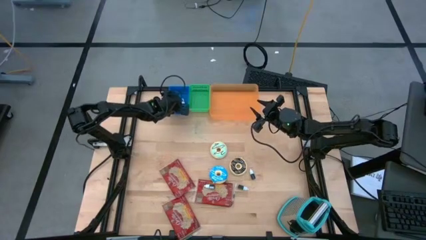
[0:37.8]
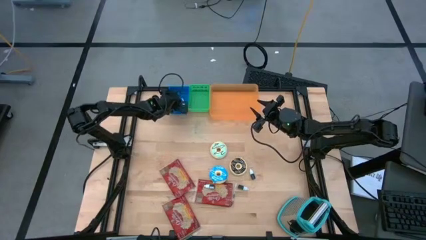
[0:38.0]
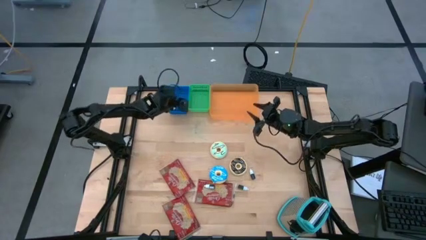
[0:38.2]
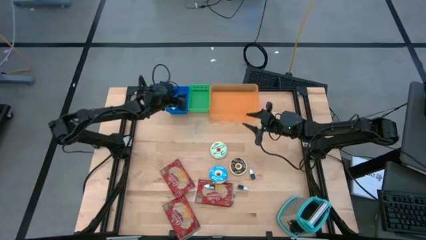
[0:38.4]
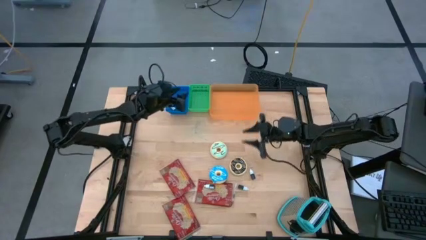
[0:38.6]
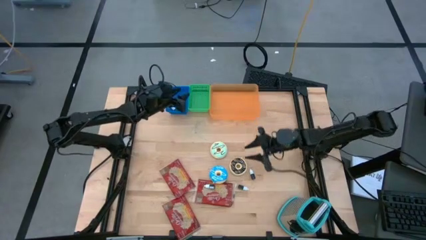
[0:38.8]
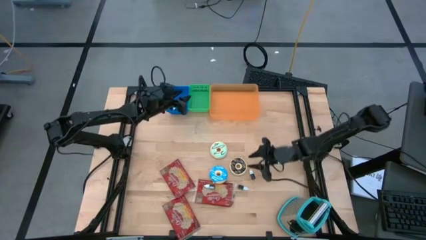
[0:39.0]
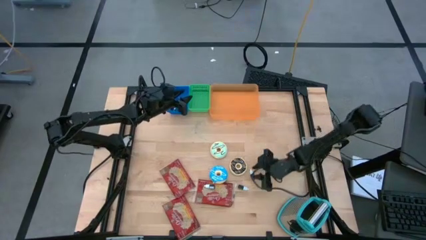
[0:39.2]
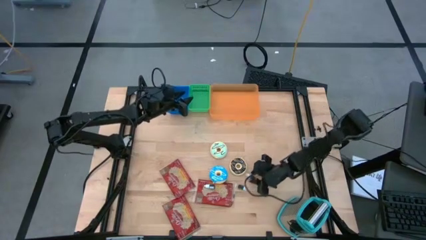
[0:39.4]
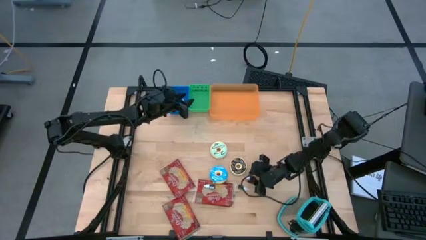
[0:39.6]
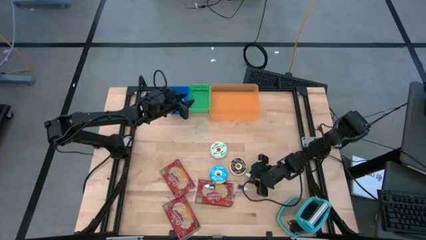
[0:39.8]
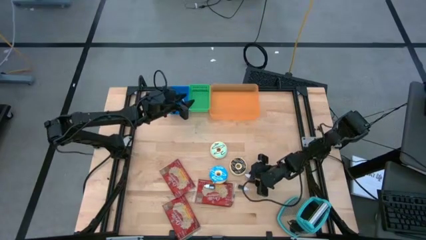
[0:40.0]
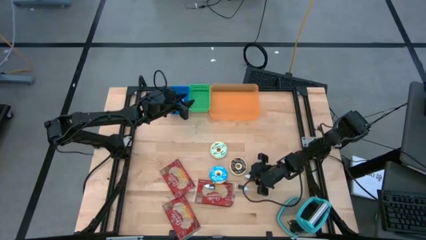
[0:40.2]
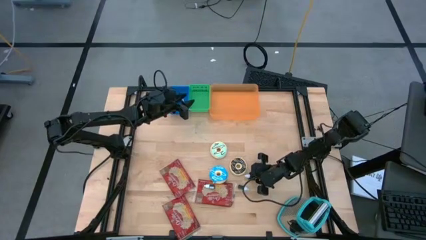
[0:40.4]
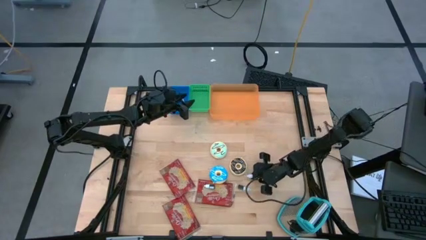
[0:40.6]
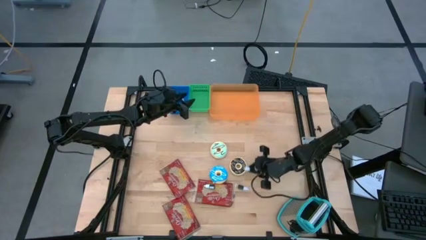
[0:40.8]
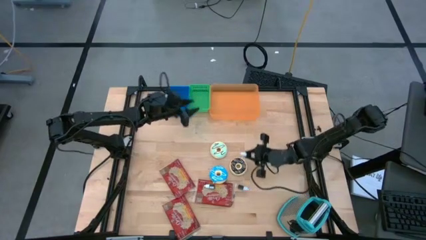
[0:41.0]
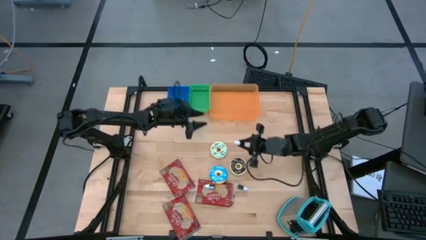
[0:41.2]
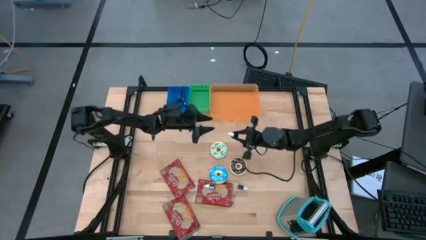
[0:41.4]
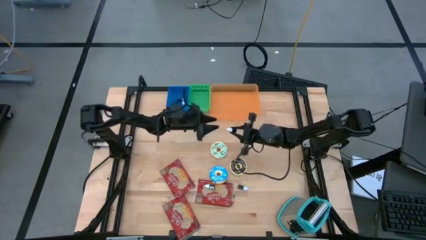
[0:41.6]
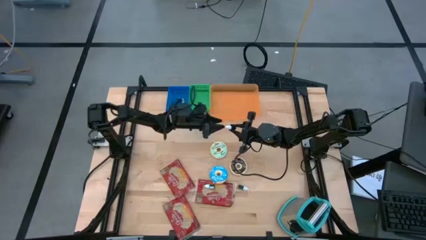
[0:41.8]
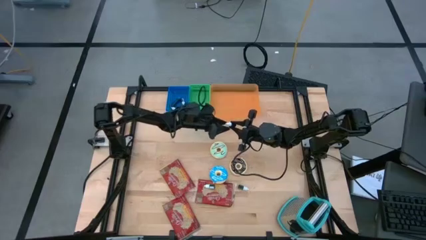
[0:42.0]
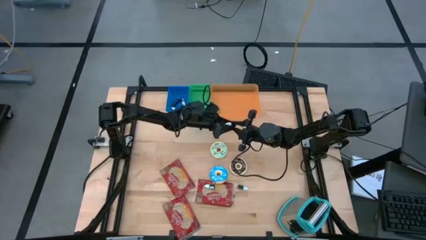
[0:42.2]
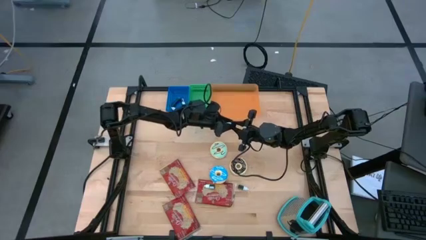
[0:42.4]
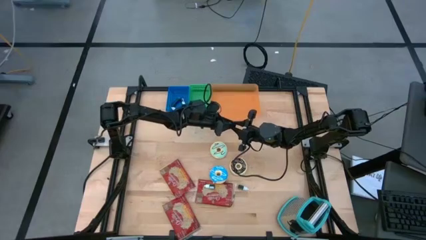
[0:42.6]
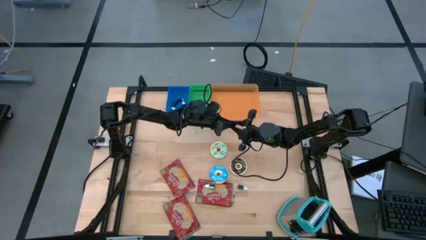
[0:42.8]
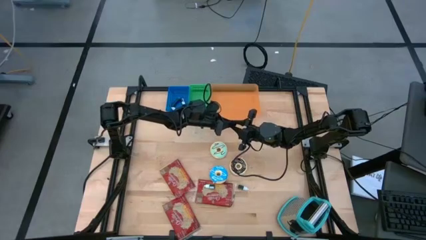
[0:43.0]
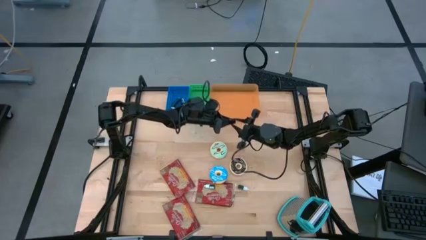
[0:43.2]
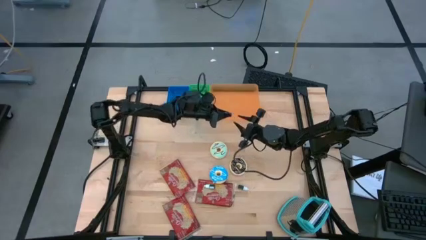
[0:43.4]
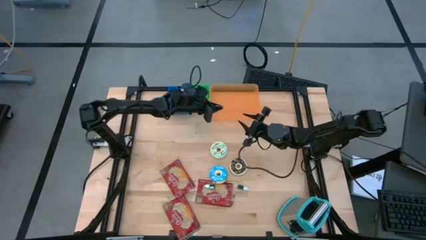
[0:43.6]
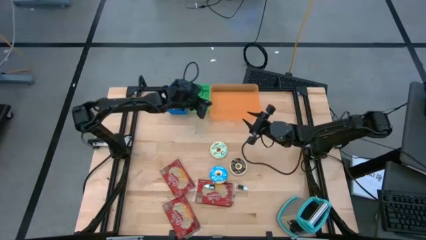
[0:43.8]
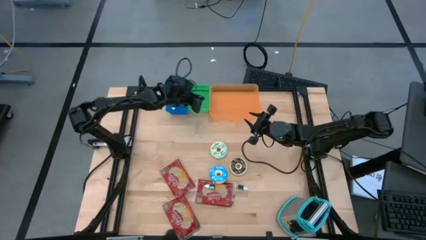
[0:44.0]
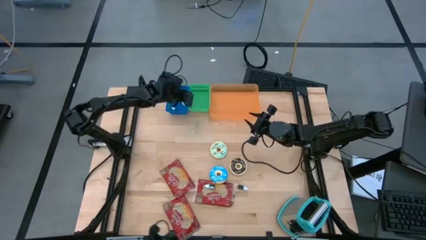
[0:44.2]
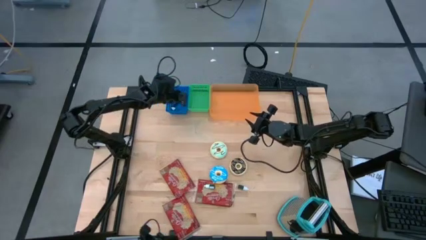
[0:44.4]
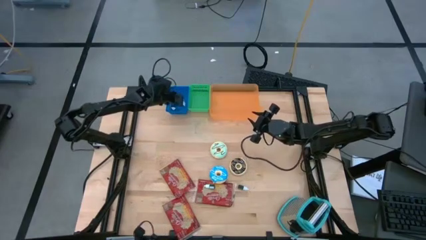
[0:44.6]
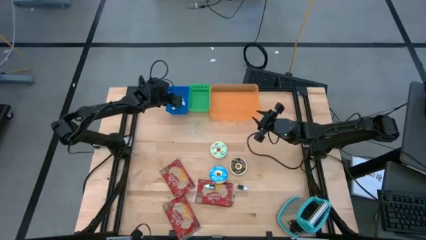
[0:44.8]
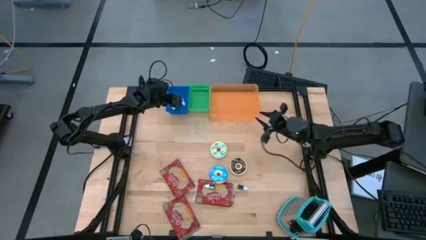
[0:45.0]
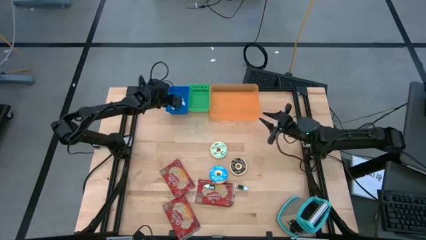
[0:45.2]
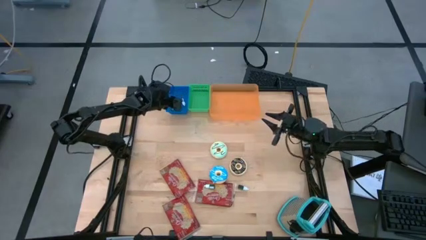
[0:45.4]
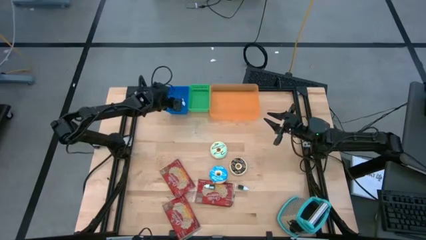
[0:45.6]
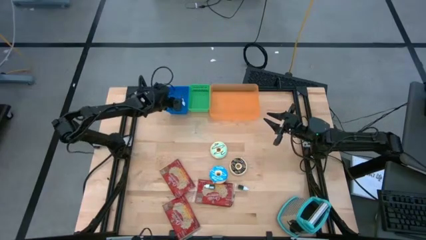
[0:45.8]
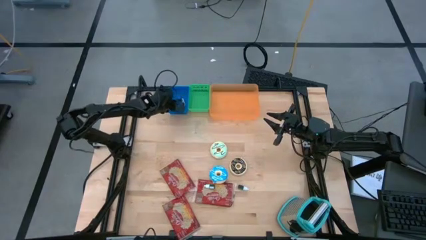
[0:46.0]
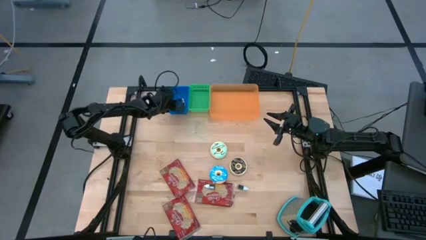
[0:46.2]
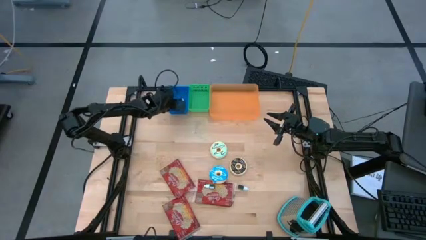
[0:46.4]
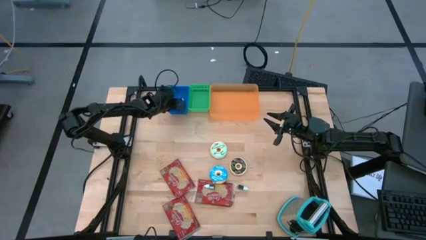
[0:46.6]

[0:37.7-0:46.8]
Put the violet food coloring bottle into the blue bin

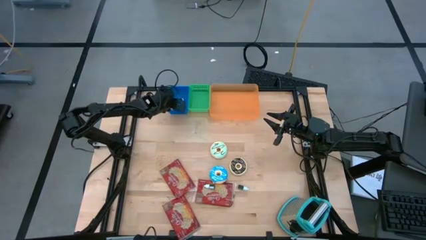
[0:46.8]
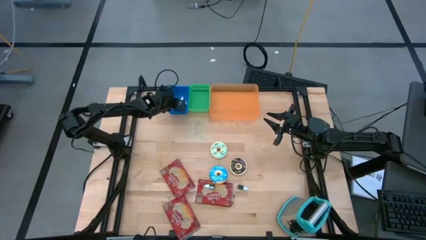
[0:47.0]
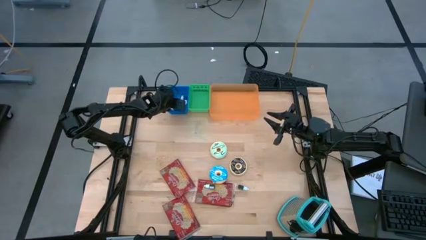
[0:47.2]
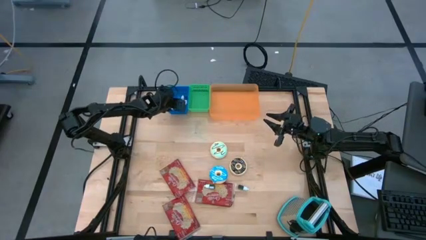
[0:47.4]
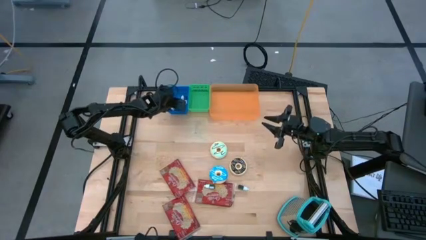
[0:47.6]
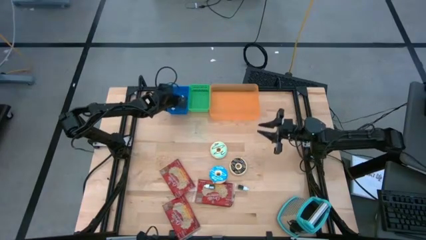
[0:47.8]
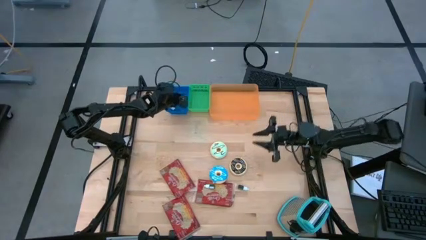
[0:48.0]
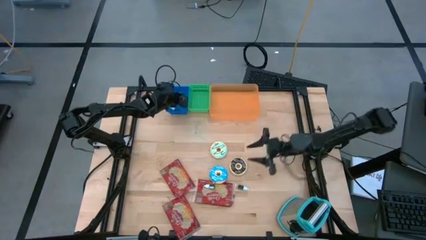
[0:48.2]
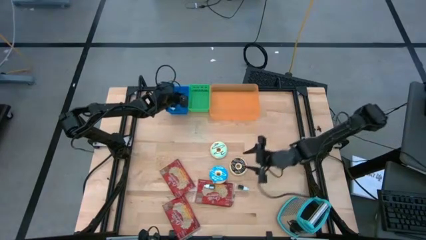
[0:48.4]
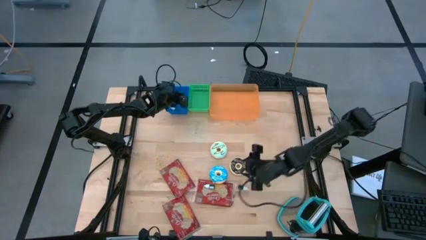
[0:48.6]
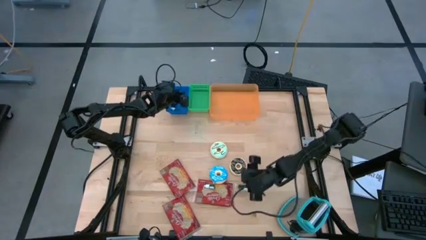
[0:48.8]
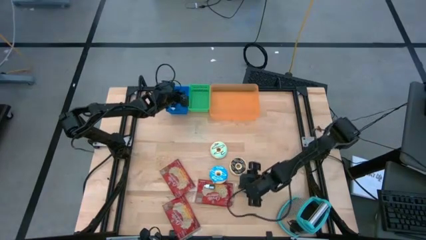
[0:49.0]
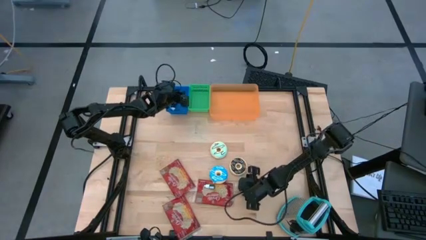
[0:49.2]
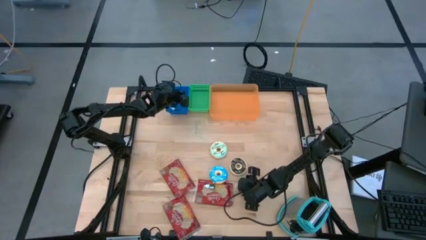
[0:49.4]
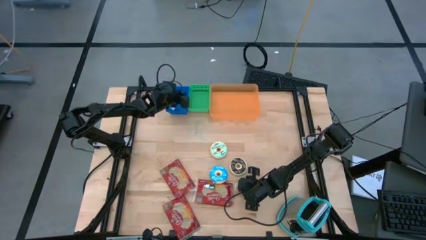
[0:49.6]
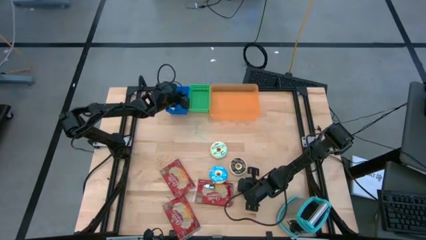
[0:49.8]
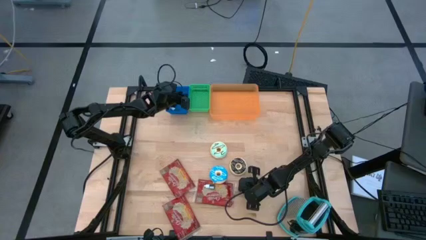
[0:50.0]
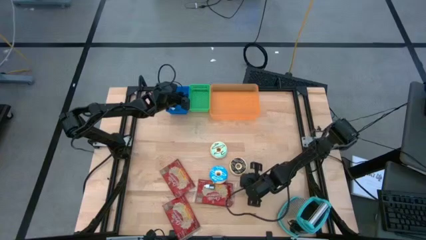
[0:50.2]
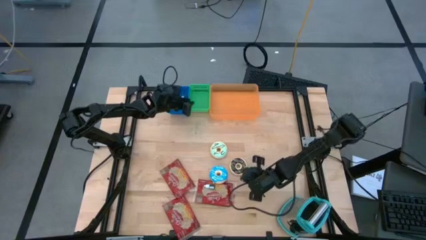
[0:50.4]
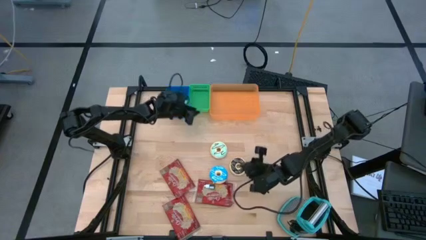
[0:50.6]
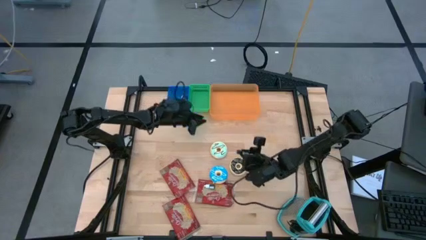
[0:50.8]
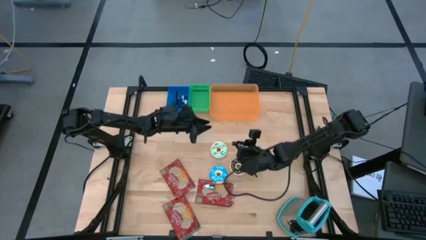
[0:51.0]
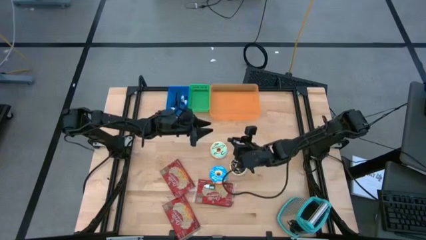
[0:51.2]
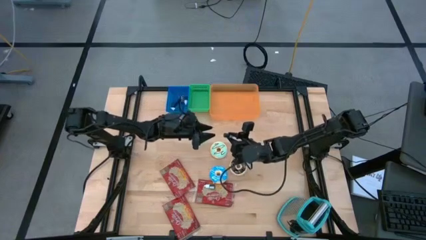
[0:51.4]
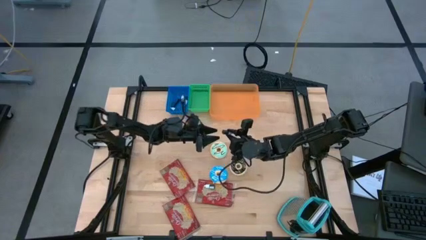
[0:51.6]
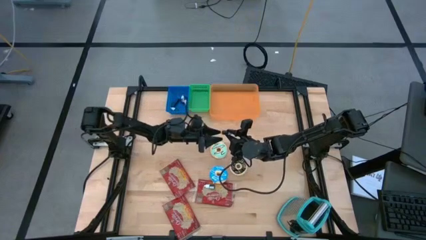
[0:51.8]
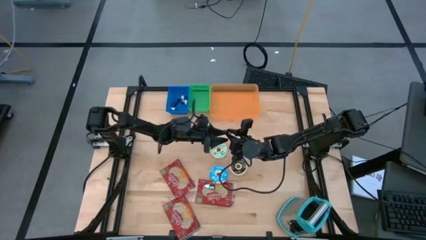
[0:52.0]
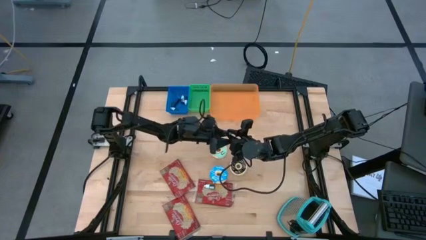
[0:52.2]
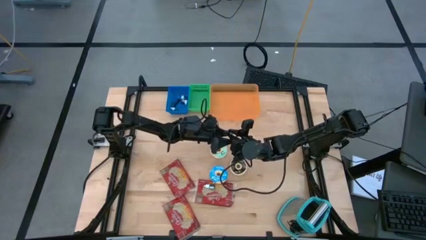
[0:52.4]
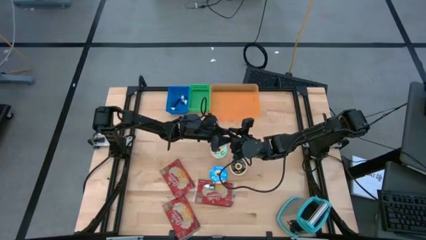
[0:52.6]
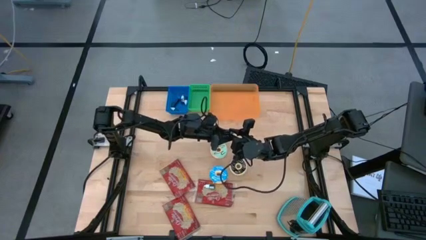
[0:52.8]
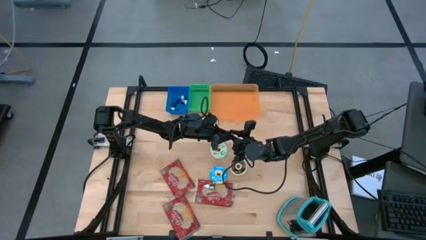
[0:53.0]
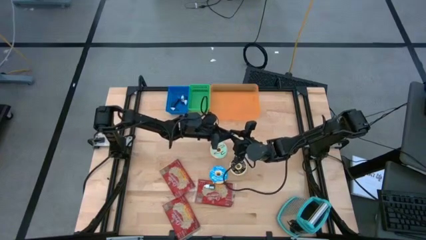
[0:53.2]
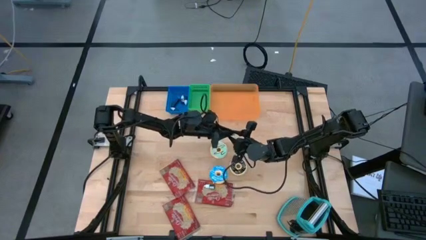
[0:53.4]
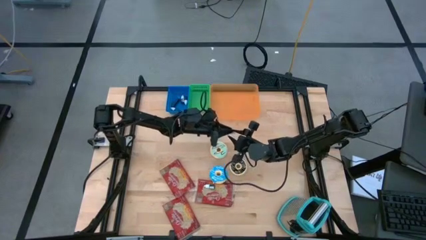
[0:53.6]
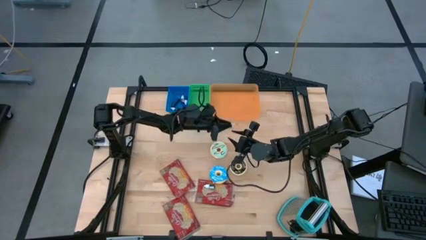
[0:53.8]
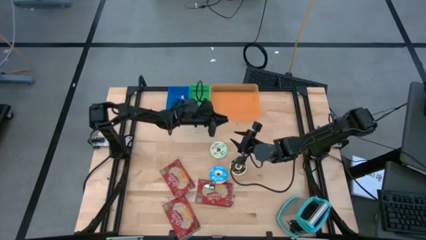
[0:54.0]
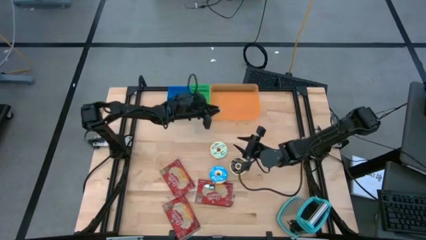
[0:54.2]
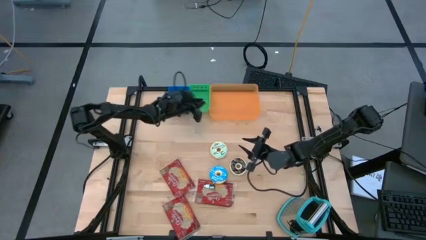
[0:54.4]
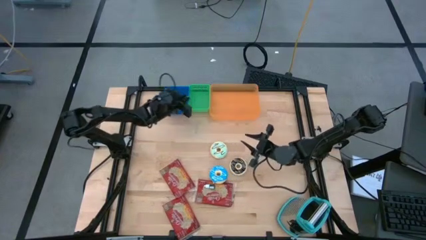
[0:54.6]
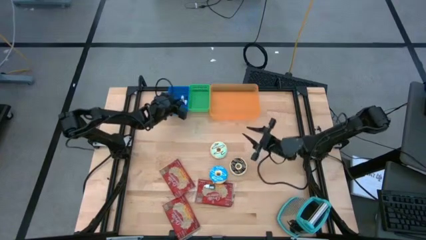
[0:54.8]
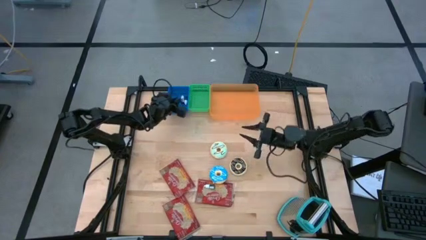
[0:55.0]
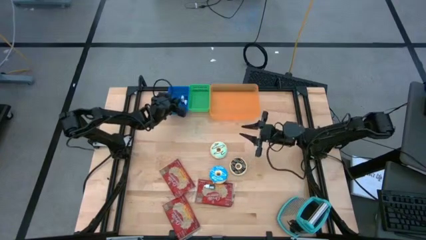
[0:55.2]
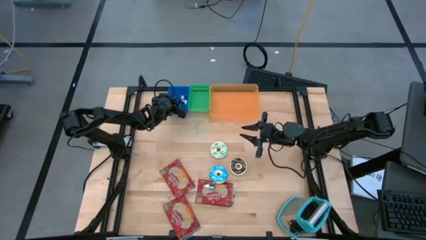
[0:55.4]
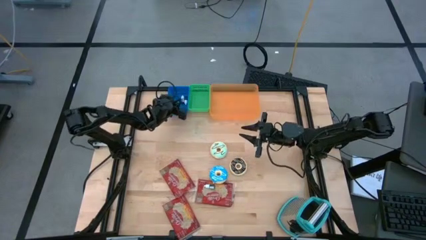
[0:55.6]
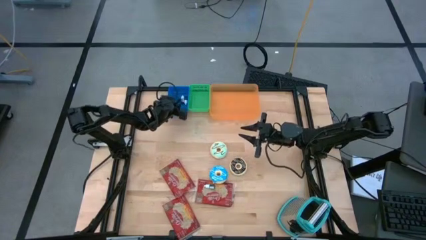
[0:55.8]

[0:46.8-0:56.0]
Put the green food coloring bottle into the blue bin
